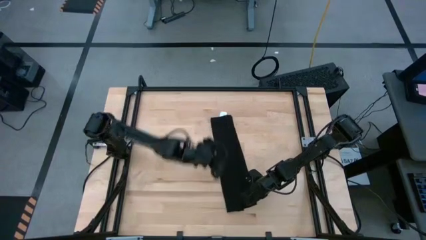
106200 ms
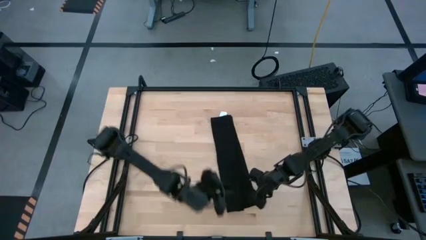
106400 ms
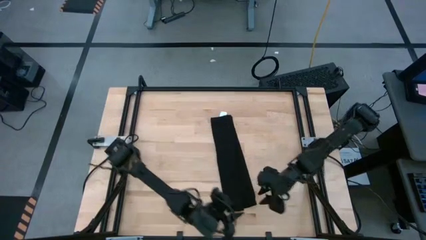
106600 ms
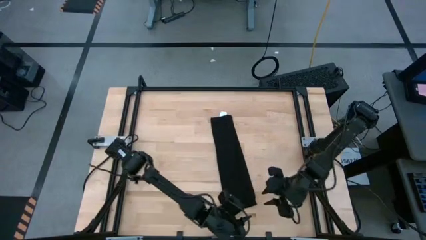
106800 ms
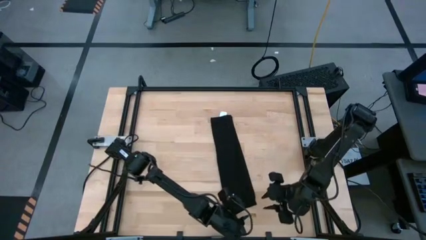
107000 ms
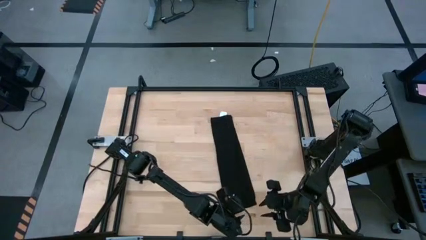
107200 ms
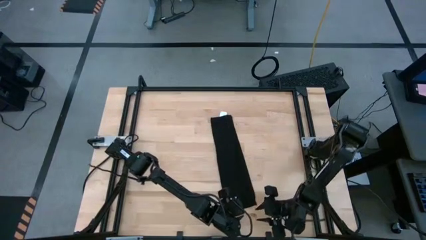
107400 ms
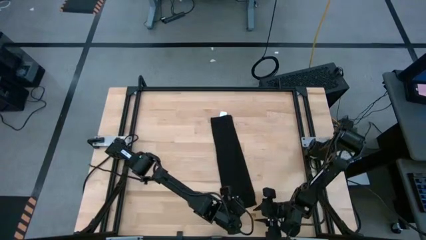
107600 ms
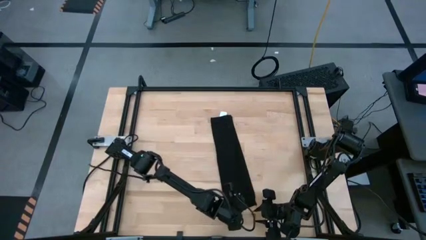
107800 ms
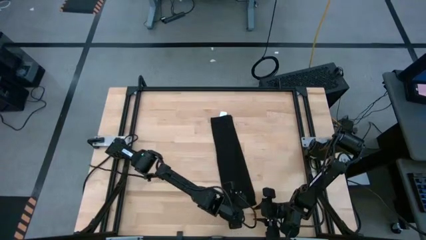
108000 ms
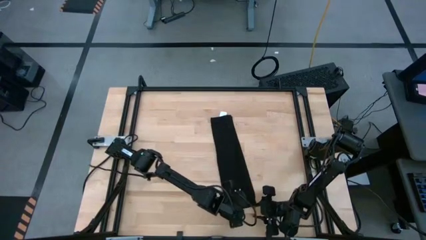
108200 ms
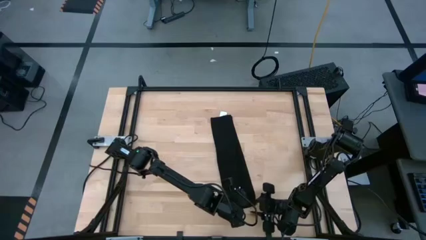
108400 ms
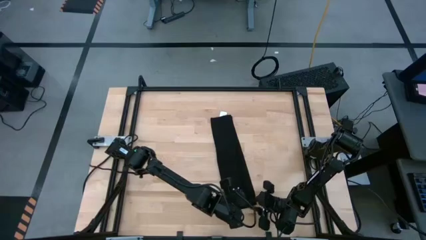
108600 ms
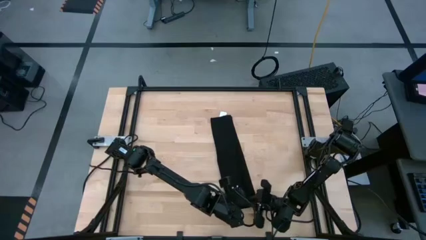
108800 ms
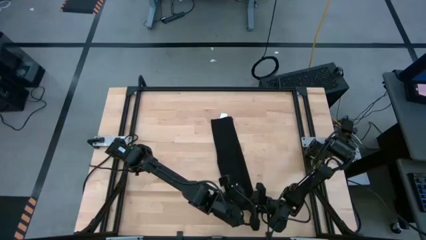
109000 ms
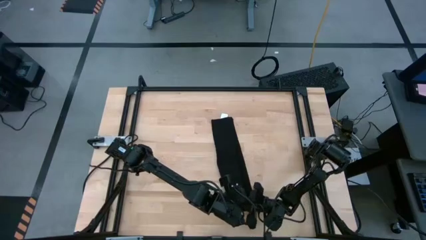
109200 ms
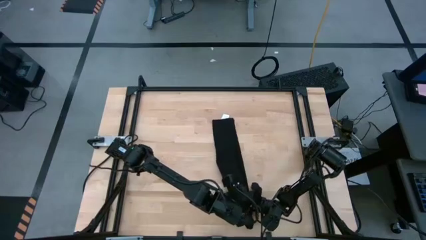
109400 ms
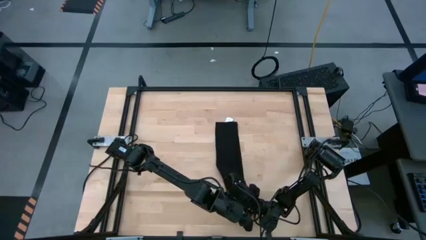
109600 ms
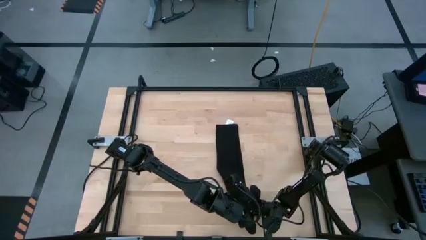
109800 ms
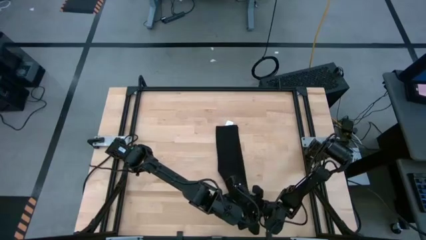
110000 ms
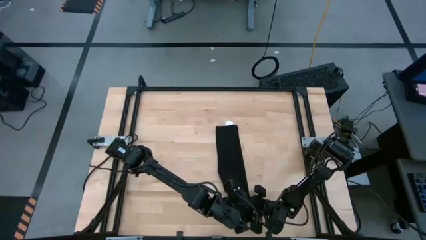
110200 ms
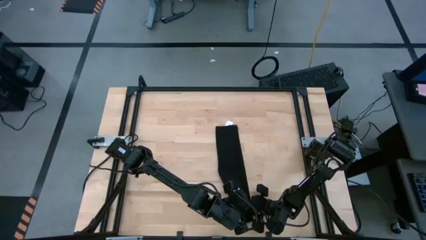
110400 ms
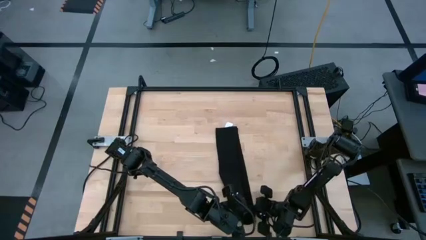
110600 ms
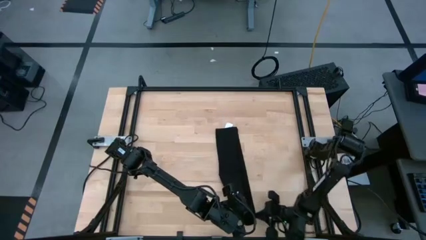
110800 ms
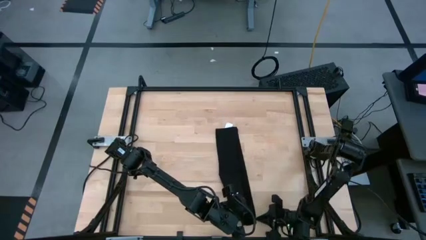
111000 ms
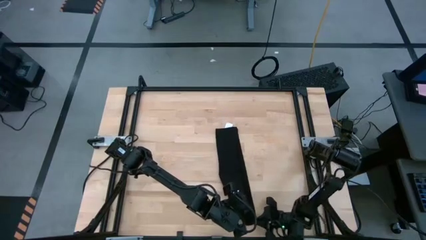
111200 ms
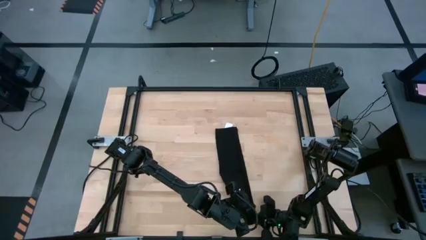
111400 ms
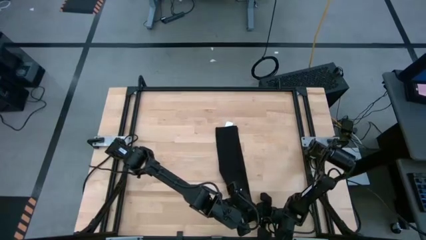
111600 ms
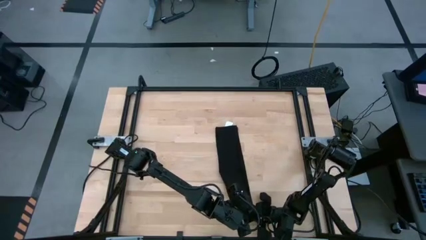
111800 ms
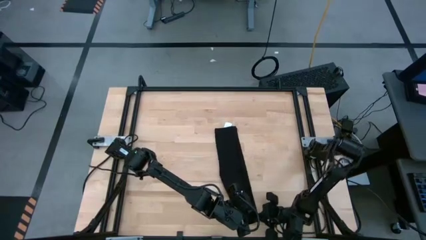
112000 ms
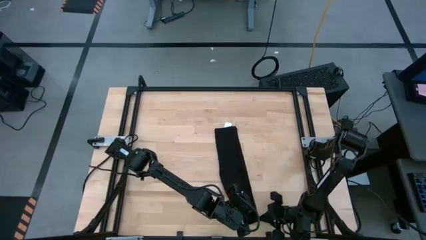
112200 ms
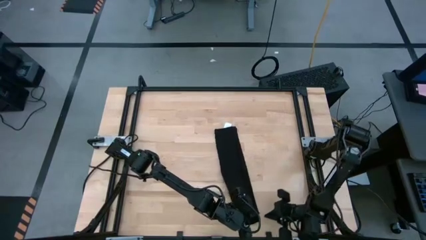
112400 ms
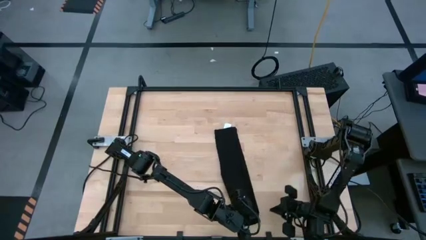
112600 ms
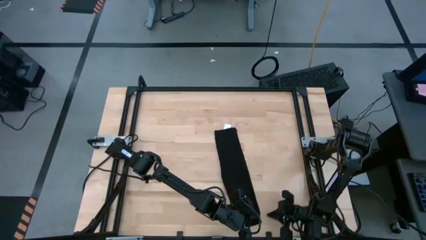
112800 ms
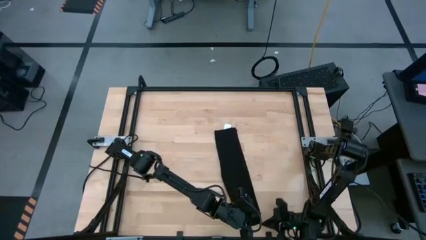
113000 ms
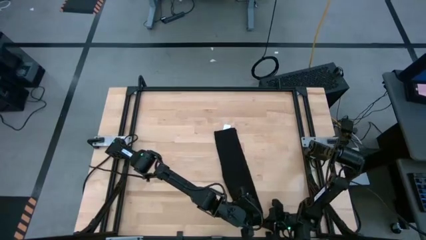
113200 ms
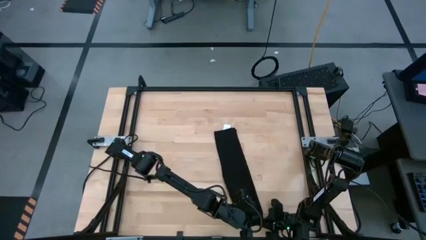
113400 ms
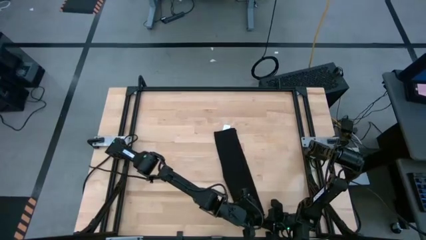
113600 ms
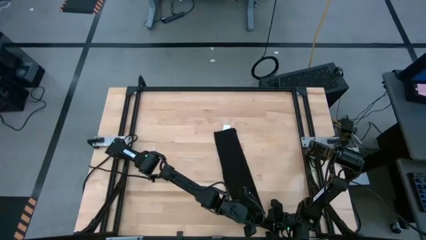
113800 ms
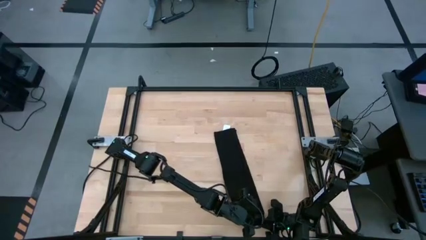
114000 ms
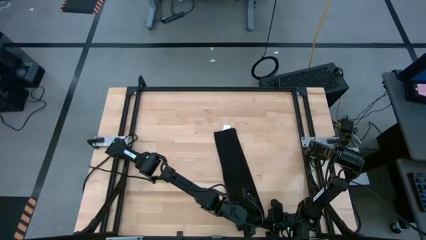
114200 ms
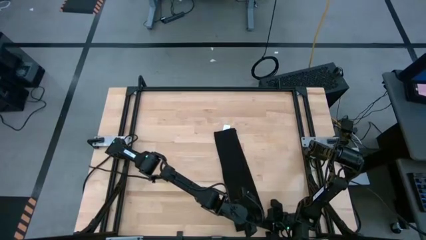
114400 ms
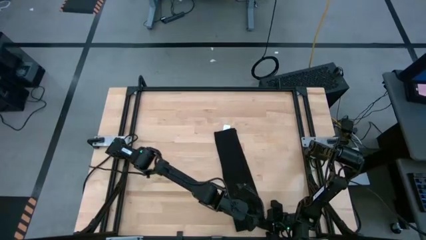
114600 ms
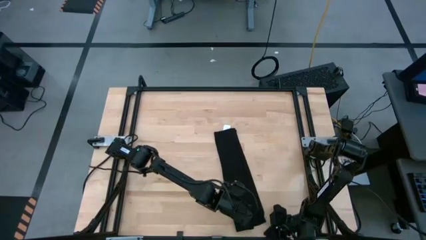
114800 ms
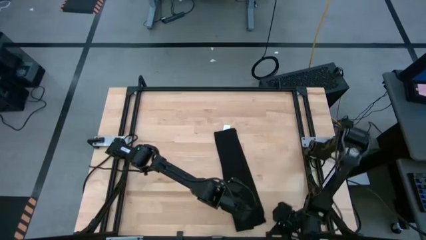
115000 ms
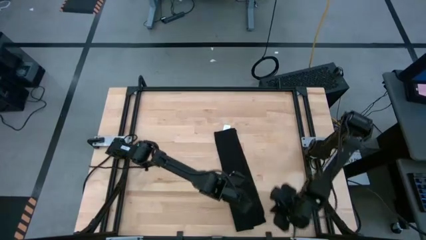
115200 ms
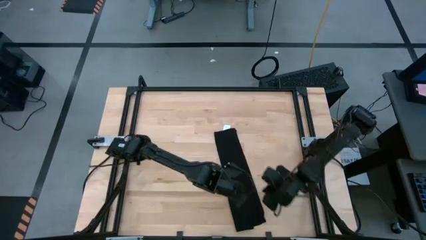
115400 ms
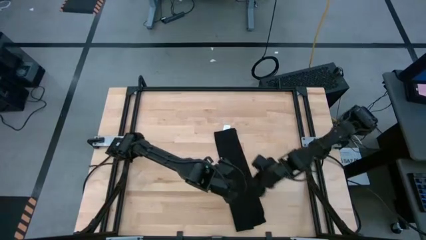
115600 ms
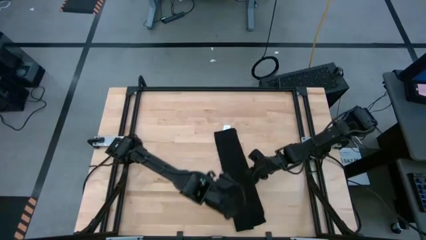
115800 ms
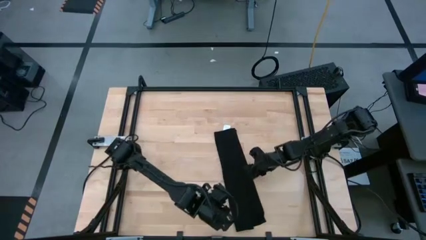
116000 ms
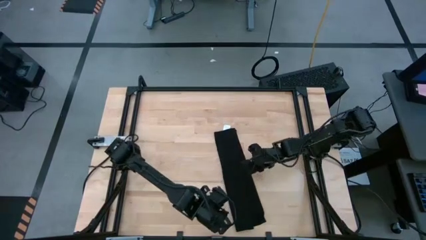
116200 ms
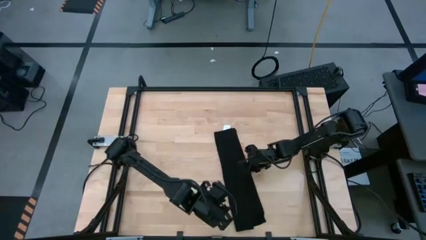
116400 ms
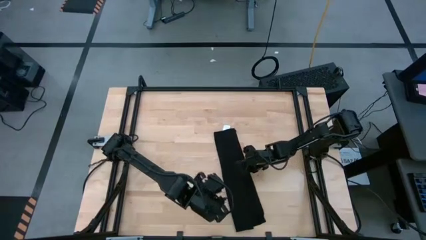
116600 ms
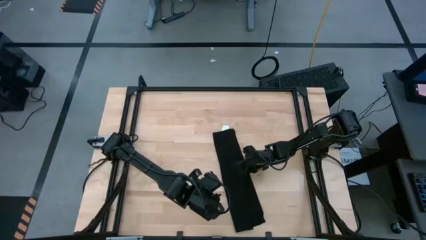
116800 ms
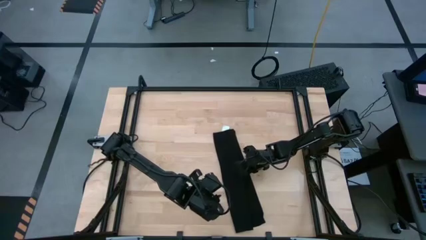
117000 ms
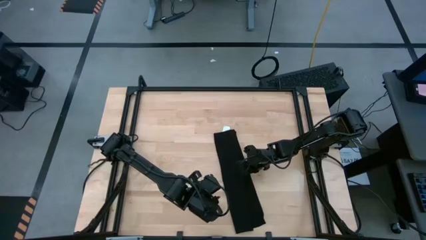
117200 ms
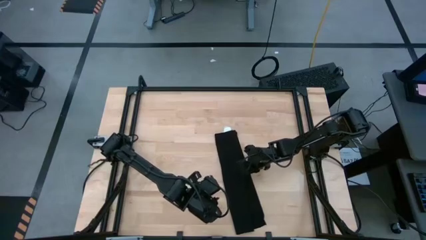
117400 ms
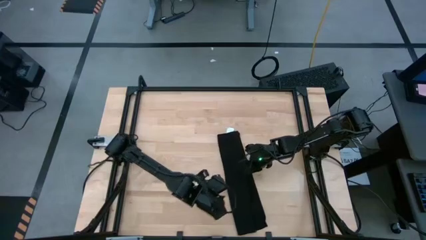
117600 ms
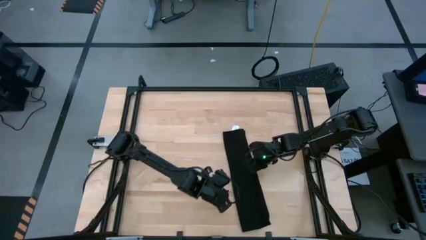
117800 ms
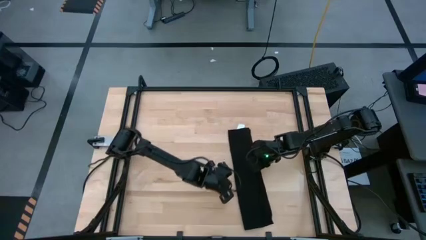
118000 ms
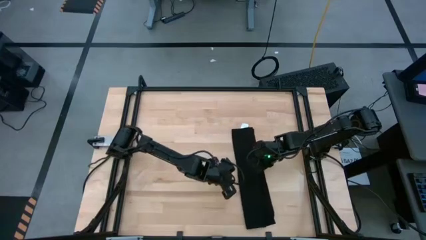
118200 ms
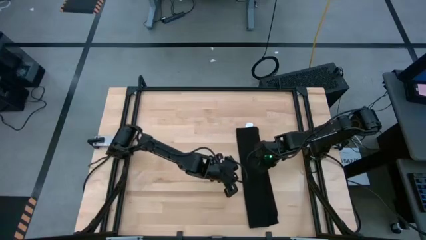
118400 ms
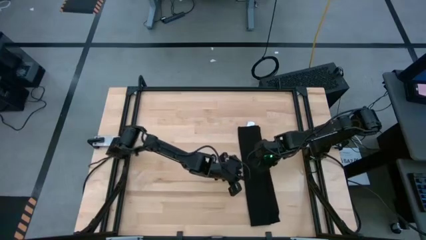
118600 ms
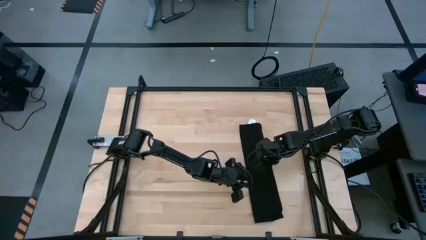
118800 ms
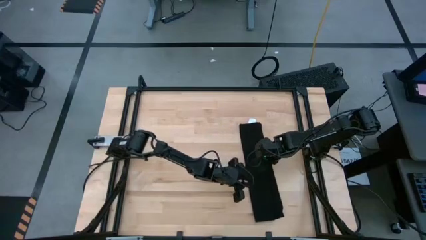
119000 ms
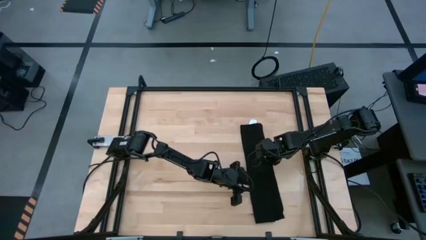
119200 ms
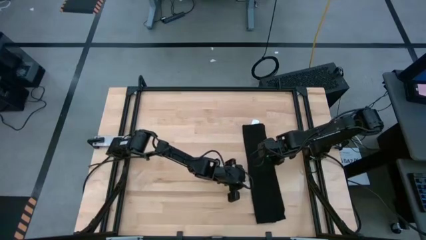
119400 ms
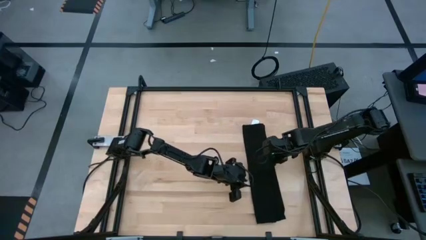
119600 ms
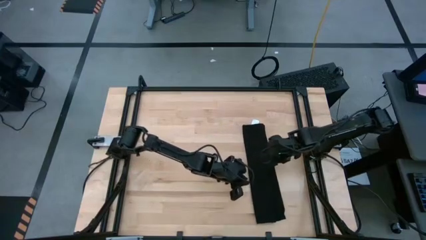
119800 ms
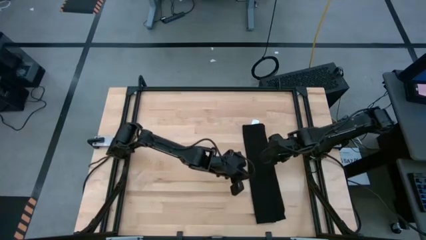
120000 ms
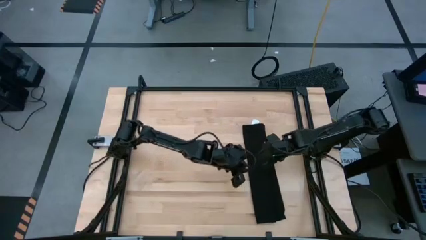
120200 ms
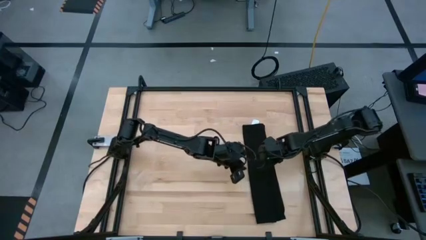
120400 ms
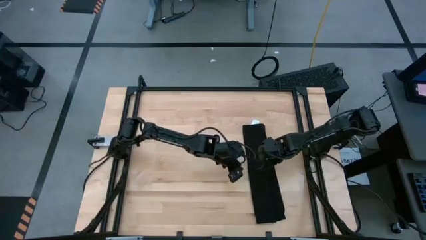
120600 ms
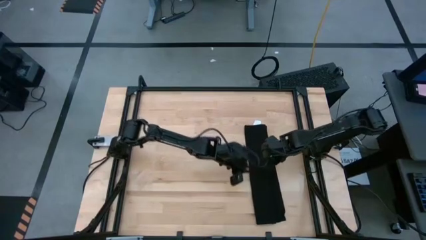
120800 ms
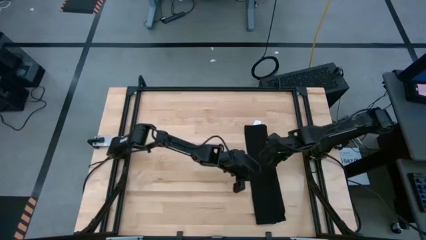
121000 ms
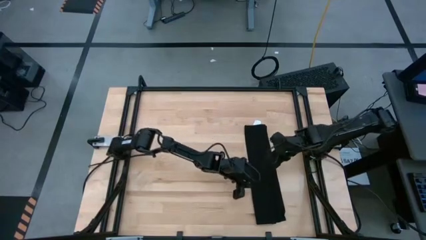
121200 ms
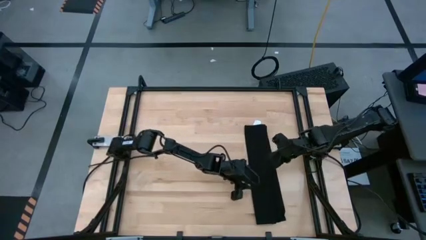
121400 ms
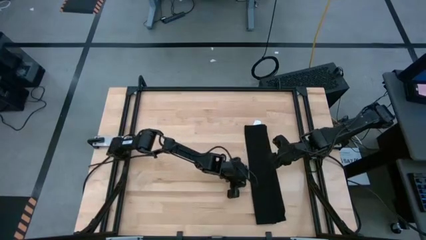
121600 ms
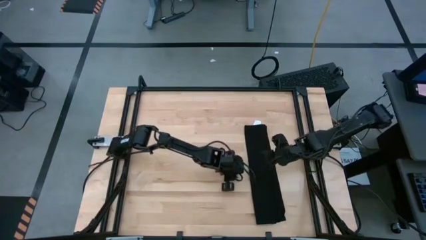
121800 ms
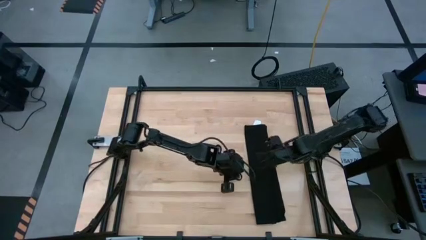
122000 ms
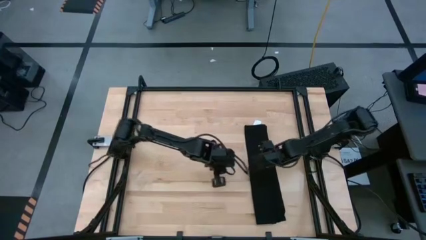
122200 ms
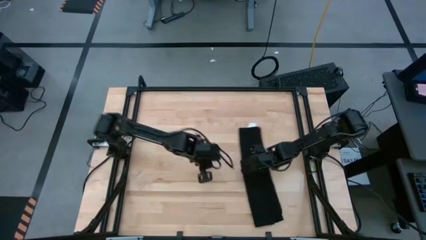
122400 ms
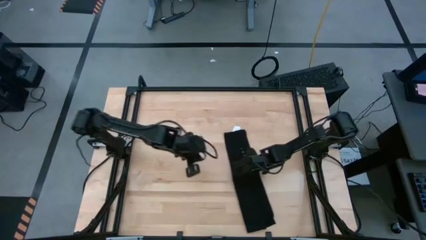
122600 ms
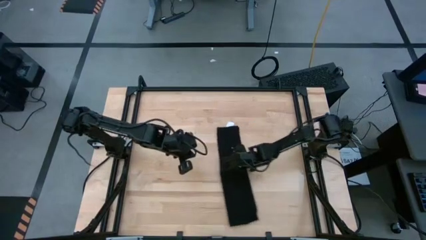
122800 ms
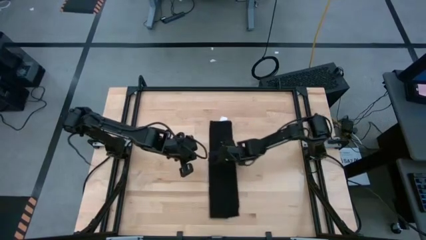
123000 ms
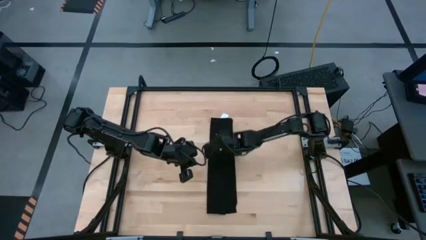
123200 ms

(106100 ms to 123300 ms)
Task: Roll napkin
Fold the black napkin
